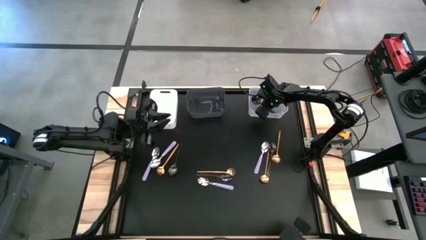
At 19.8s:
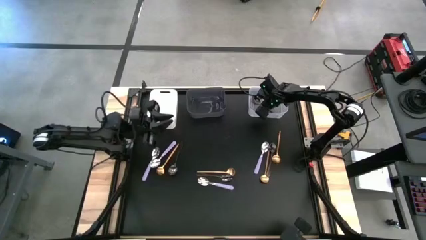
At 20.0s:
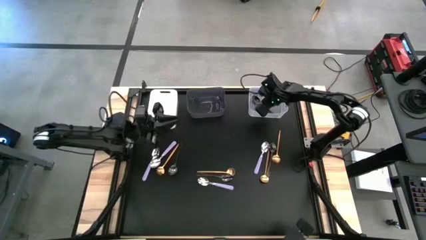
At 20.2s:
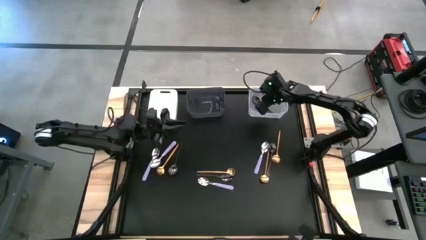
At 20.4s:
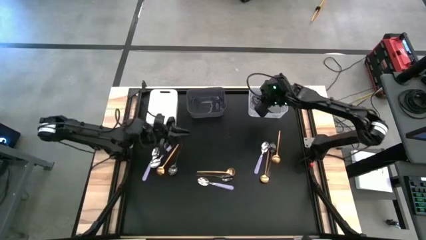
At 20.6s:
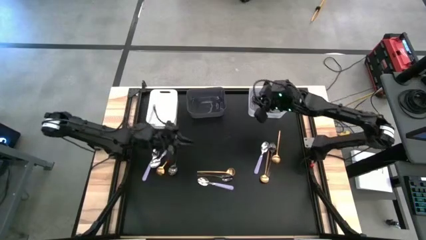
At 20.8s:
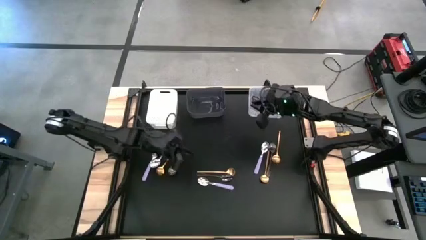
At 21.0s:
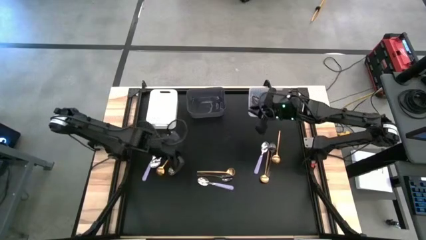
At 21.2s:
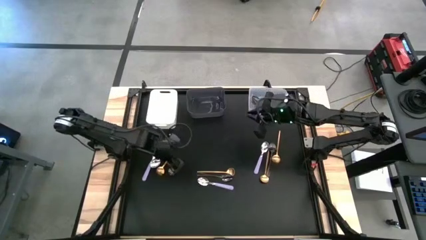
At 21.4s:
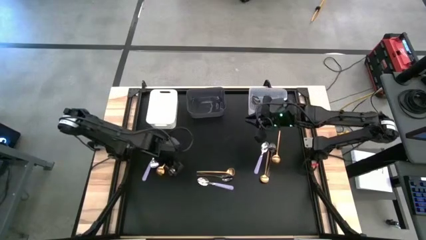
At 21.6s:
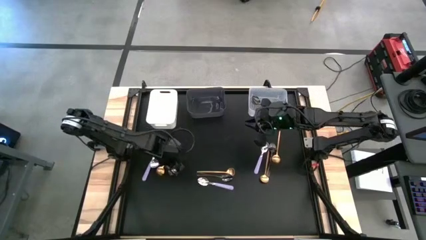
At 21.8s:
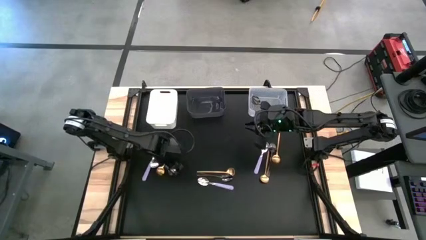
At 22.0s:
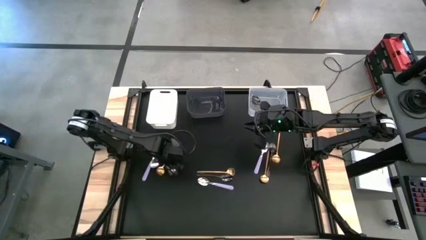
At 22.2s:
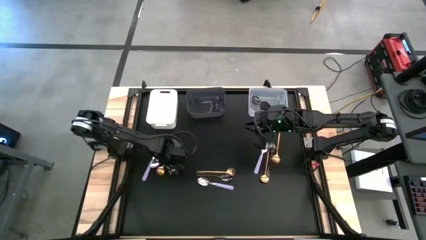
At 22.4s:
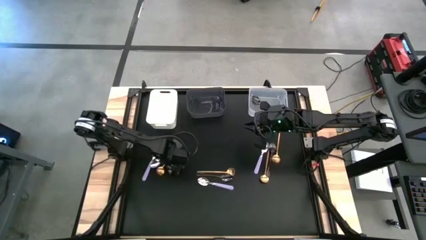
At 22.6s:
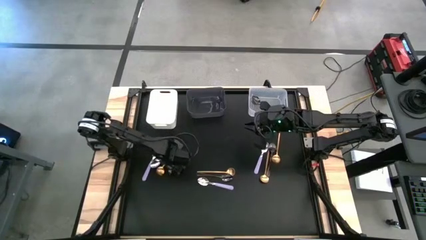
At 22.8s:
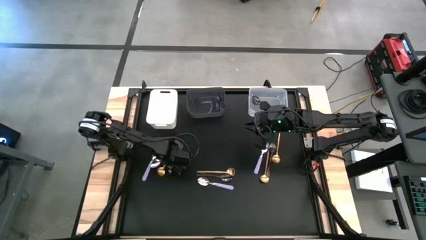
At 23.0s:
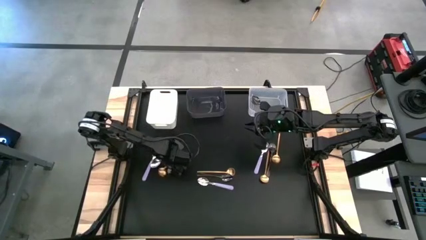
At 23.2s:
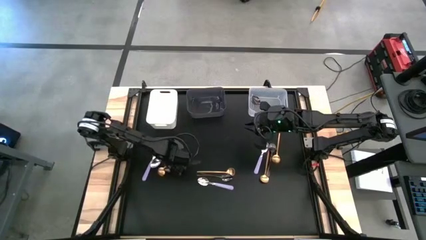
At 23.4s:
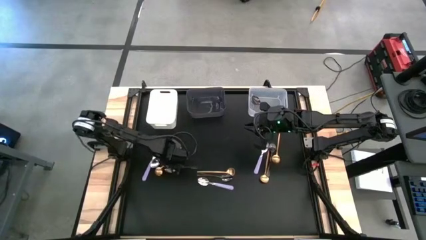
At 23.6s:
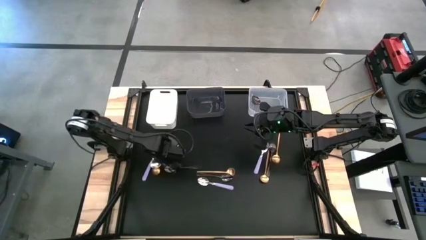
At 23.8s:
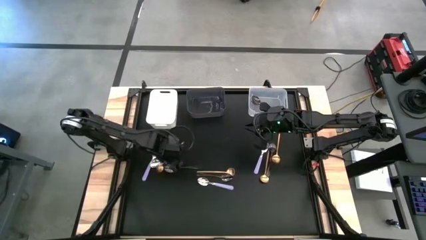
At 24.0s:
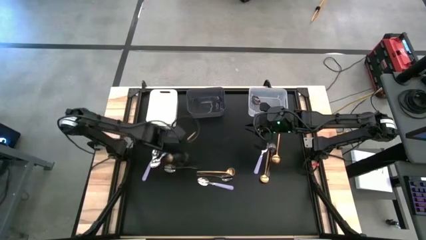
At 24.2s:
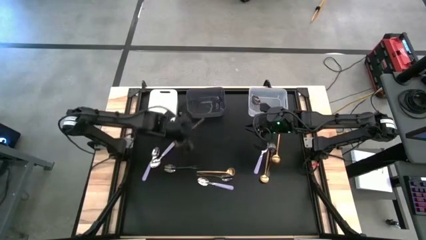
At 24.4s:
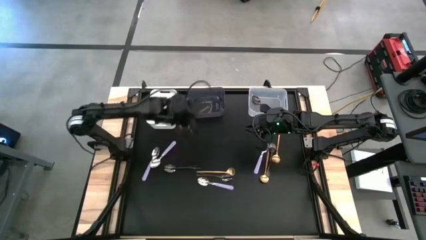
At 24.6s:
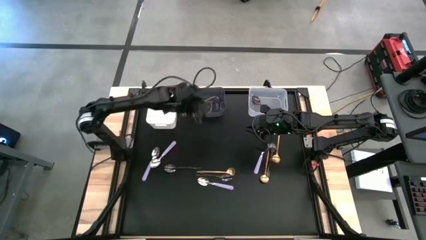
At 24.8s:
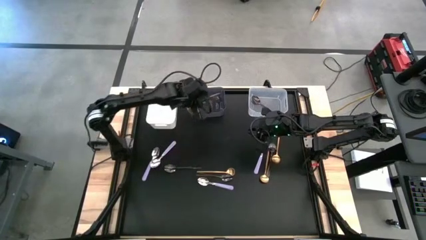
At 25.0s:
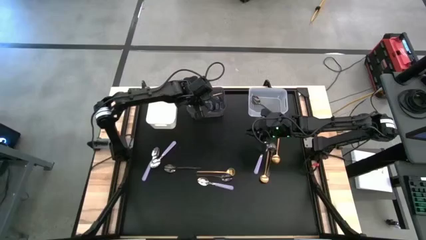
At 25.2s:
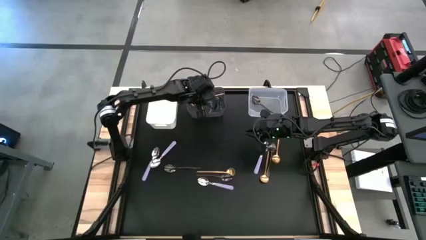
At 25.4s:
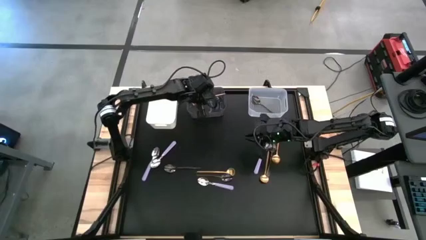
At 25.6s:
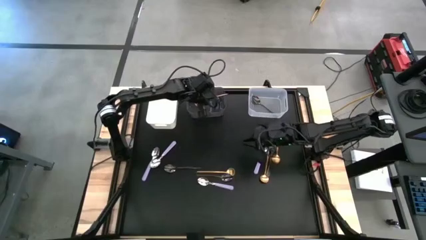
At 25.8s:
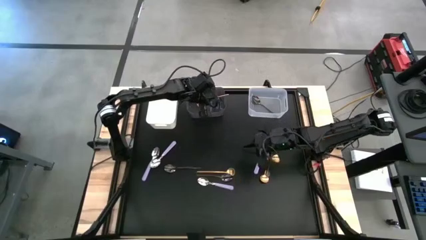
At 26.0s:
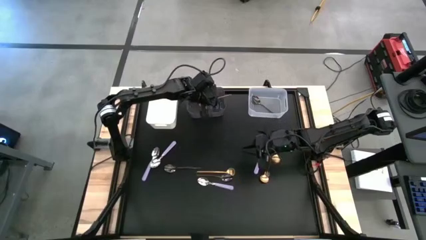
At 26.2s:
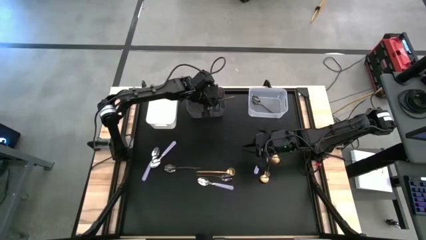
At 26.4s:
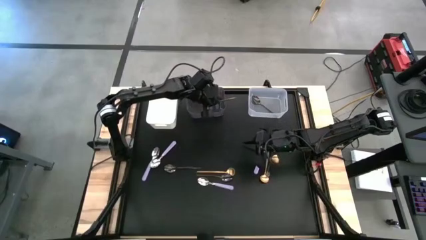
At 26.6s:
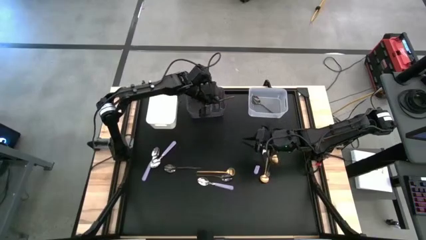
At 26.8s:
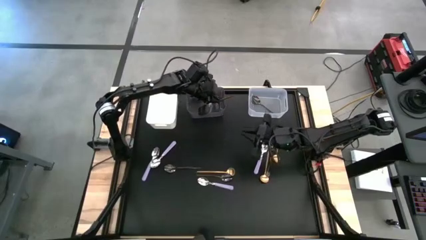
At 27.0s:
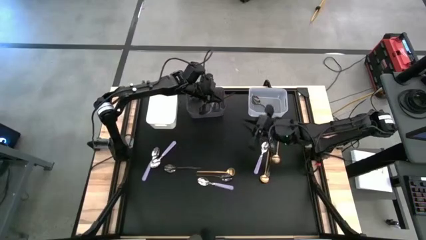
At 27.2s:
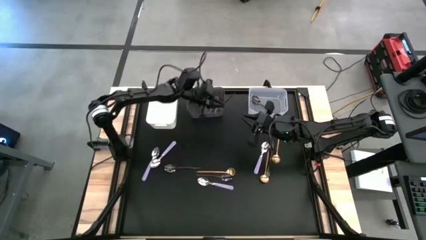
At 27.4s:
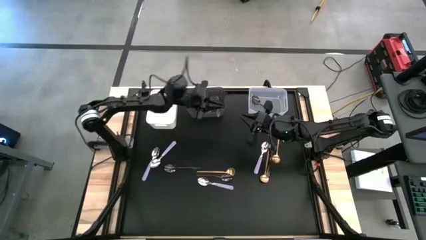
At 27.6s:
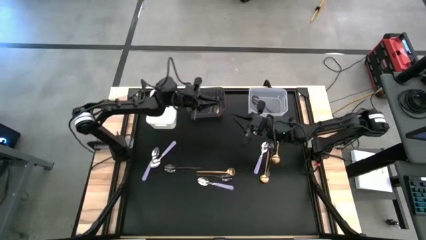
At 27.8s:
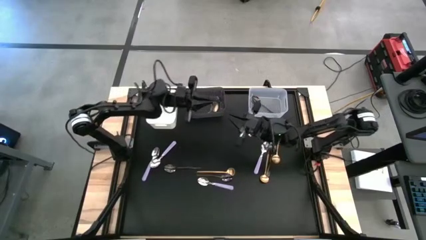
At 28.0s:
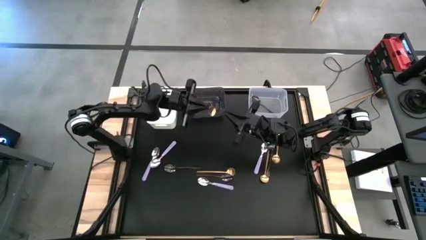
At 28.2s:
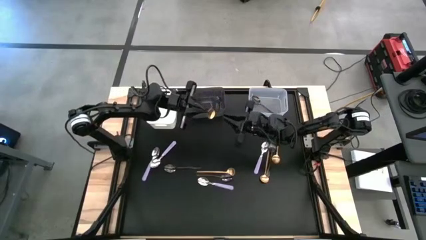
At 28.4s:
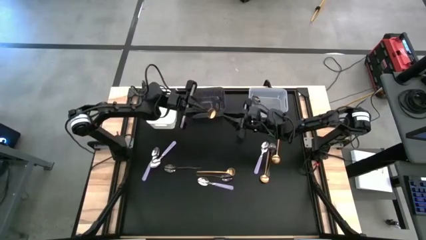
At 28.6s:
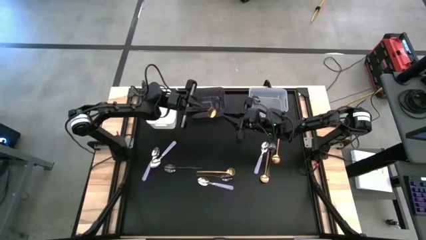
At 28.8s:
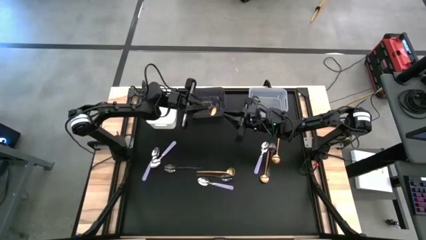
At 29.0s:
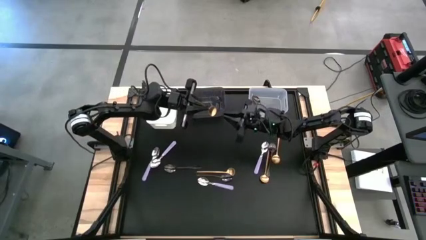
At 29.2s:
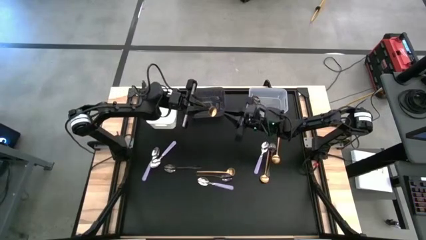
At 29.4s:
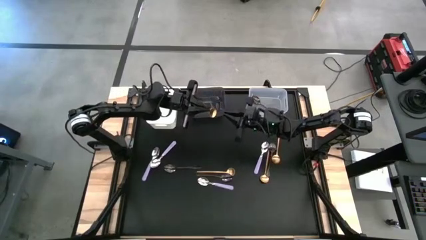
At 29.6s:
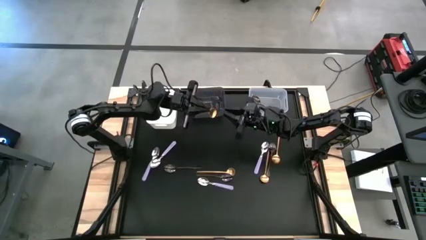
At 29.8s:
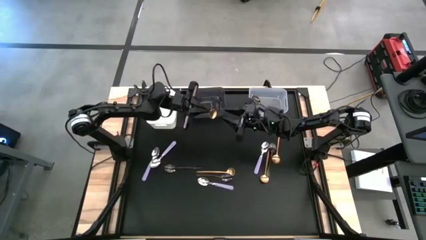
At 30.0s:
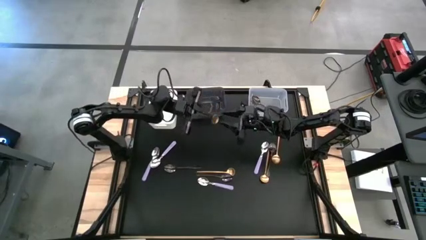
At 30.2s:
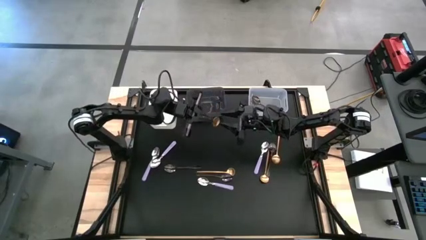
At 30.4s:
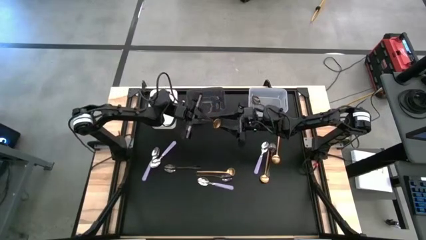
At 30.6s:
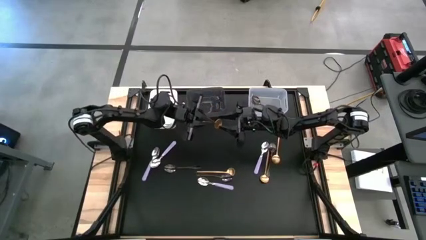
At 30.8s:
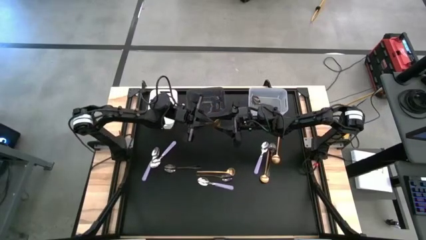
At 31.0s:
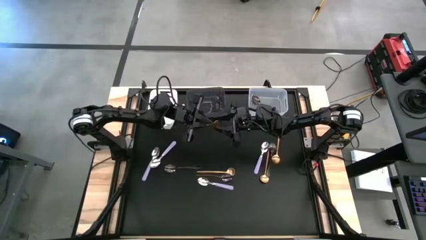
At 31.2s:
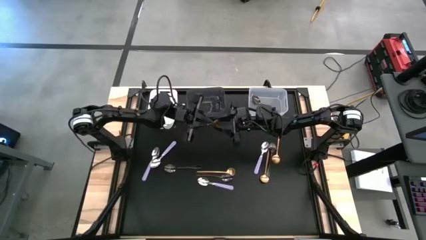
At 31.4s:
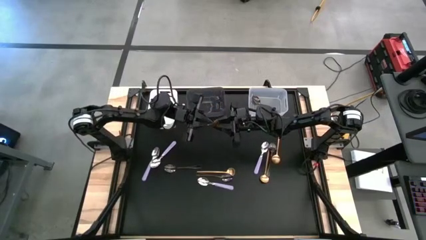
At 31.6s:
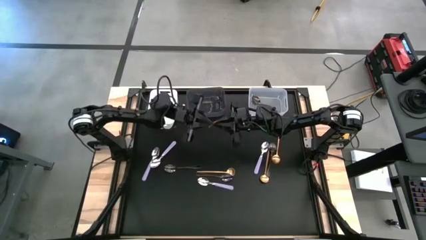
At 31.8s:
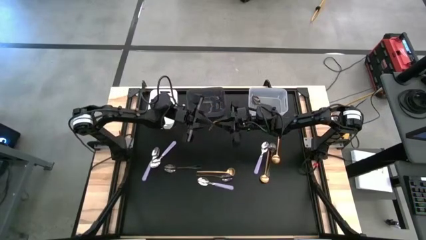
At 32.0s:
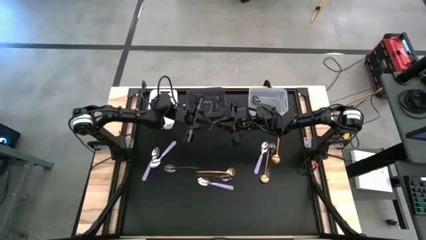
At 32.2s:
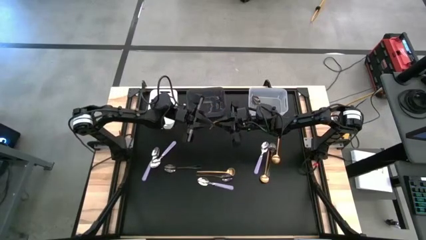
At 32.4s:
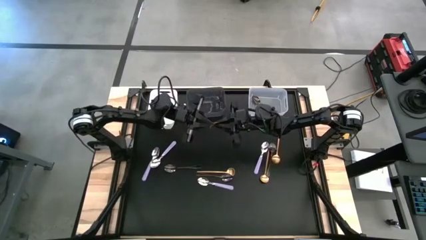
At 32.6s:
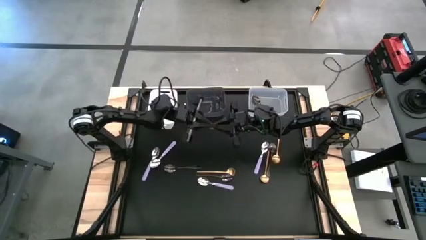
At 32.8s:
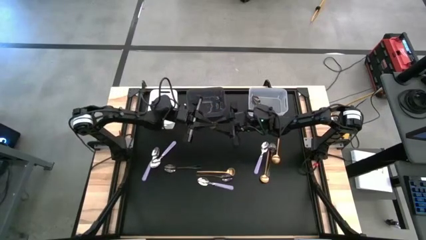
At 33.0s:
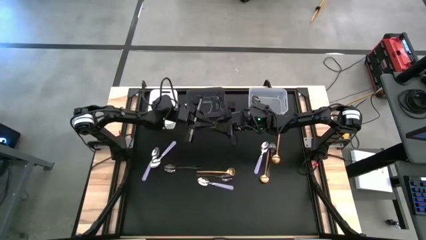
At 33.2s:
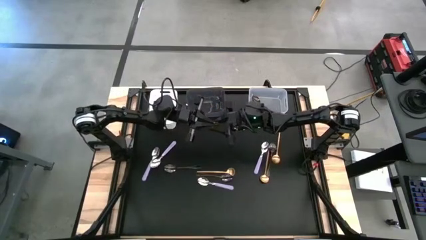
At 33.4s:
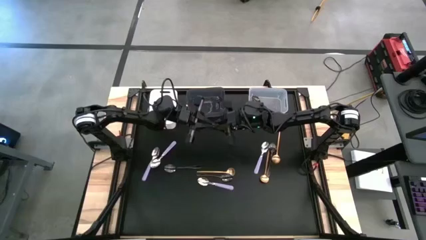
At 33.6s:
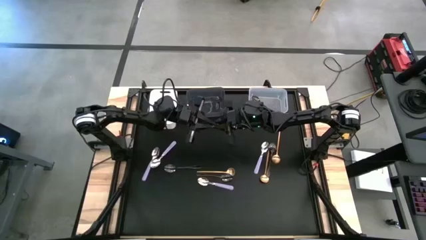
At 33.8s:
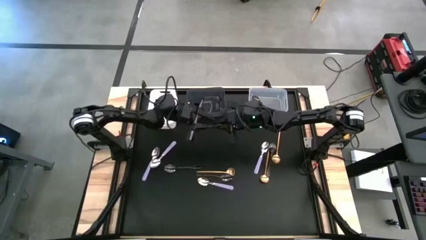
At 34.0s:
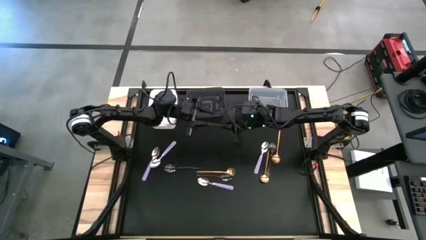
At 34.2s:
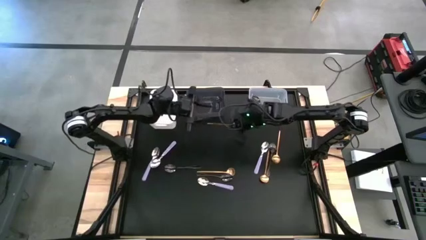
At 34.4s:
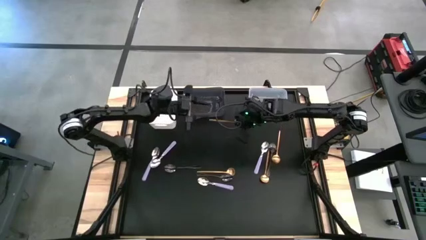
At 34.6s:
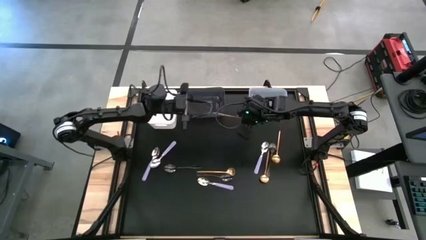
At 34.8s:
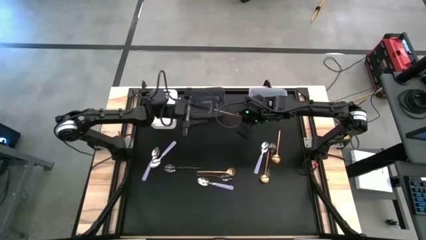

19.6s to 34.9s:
Task: Sort silverware by color (type)
Put the gold spoon into the black bin
